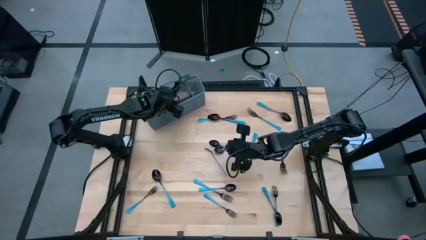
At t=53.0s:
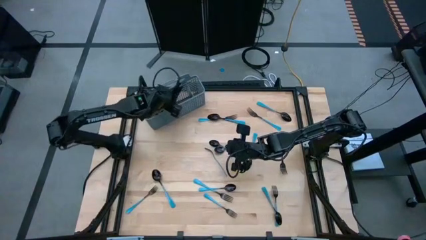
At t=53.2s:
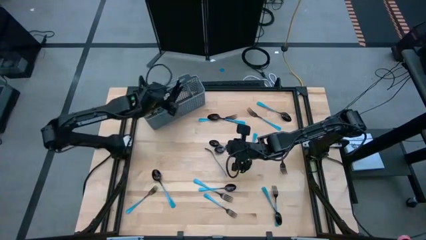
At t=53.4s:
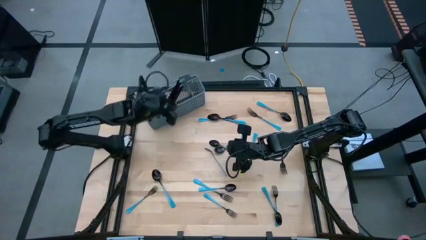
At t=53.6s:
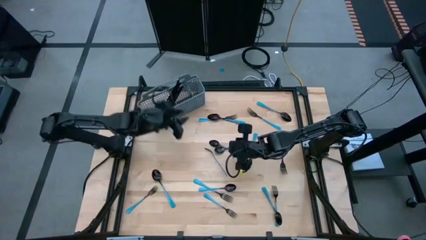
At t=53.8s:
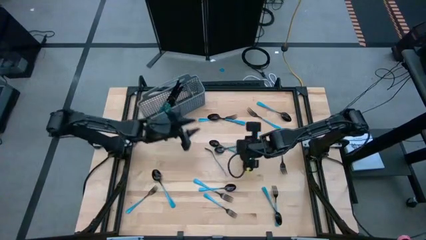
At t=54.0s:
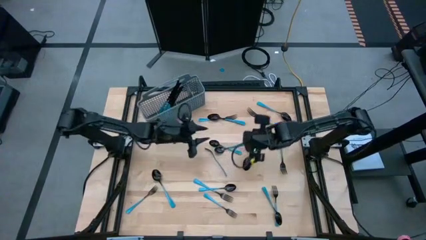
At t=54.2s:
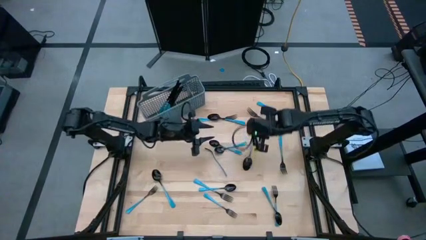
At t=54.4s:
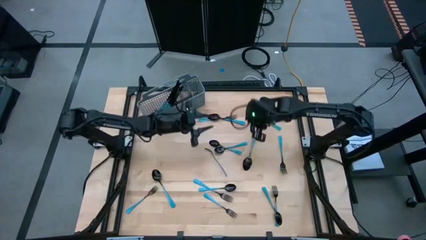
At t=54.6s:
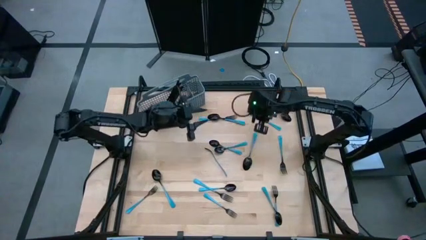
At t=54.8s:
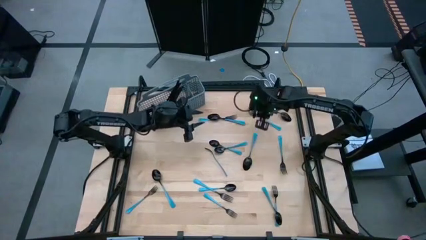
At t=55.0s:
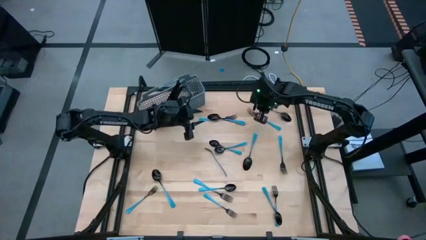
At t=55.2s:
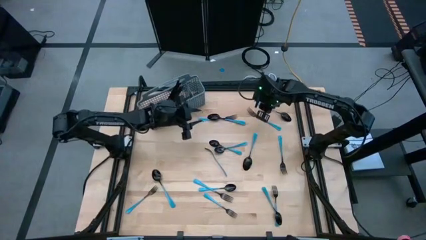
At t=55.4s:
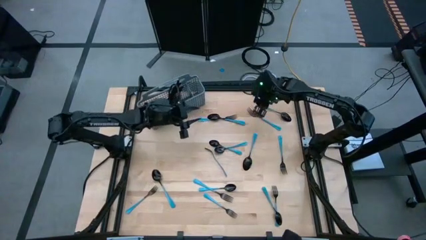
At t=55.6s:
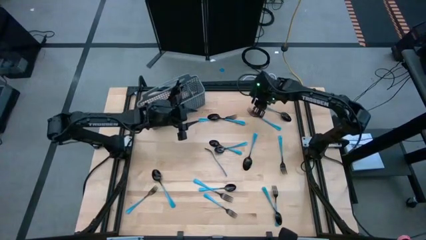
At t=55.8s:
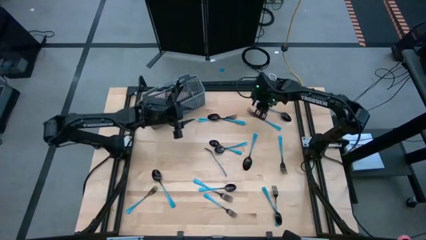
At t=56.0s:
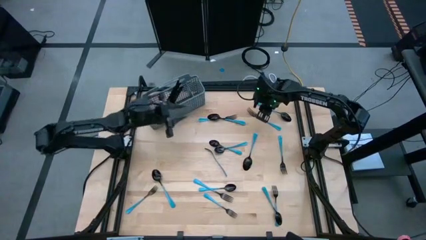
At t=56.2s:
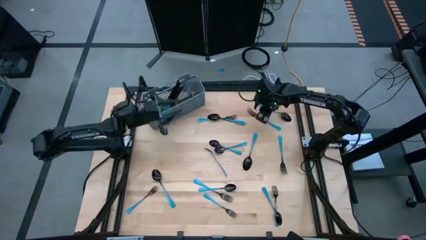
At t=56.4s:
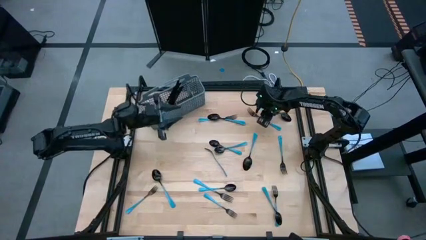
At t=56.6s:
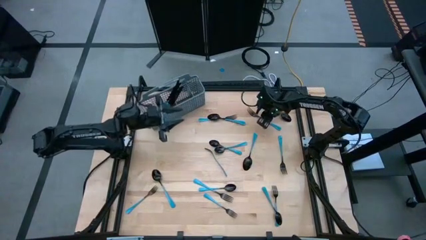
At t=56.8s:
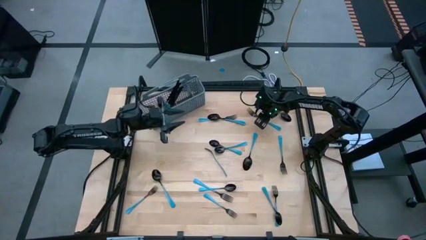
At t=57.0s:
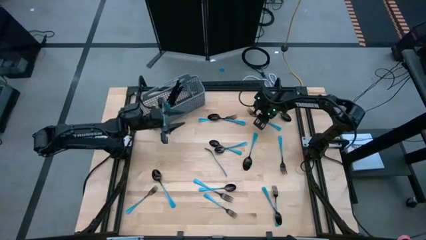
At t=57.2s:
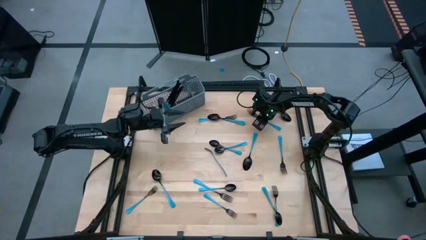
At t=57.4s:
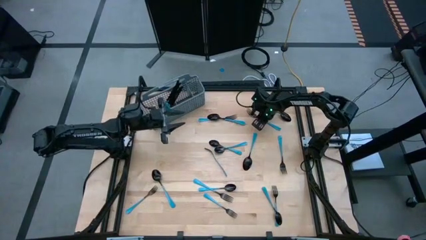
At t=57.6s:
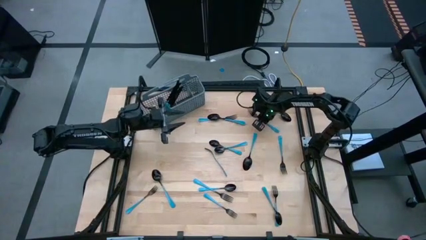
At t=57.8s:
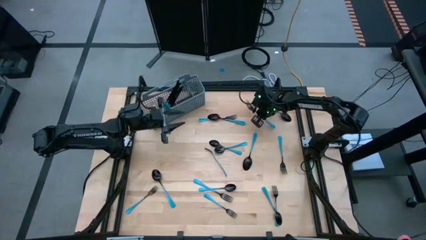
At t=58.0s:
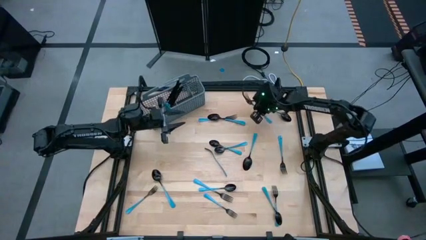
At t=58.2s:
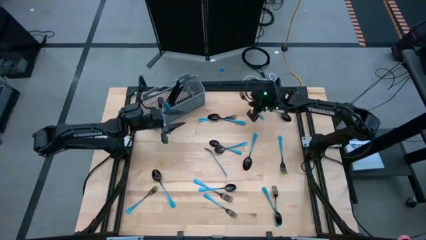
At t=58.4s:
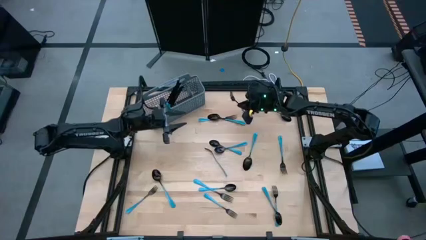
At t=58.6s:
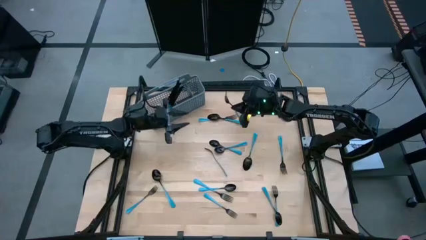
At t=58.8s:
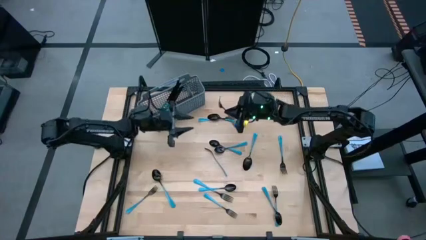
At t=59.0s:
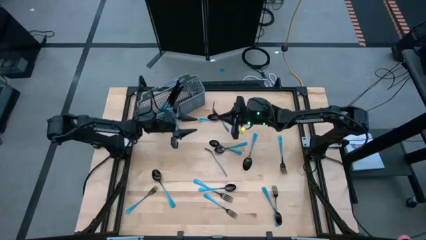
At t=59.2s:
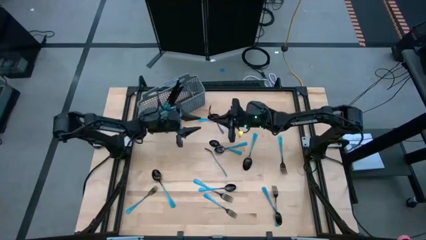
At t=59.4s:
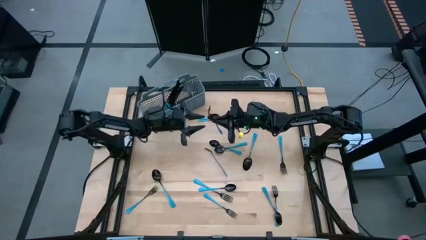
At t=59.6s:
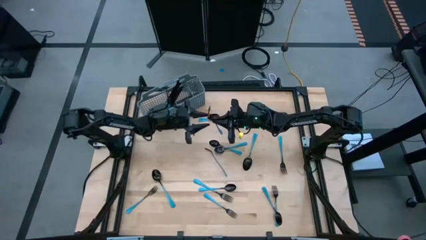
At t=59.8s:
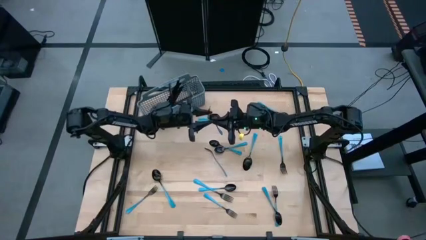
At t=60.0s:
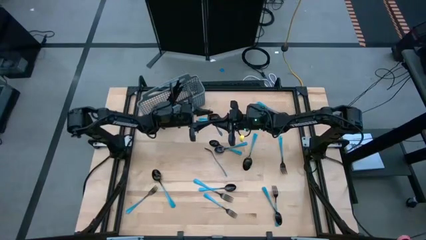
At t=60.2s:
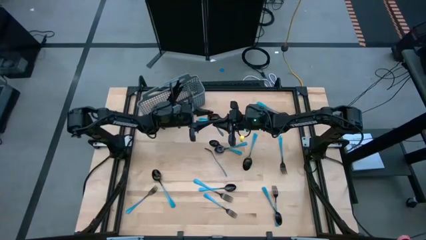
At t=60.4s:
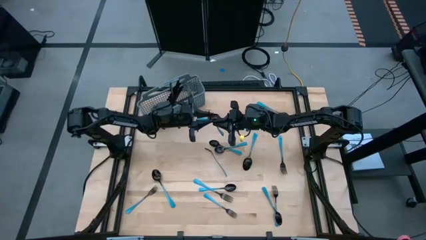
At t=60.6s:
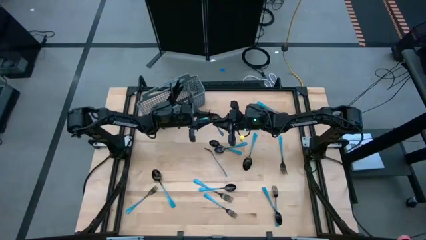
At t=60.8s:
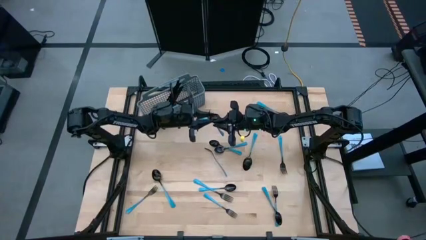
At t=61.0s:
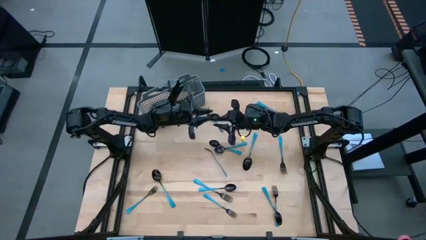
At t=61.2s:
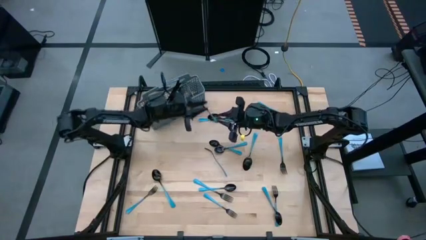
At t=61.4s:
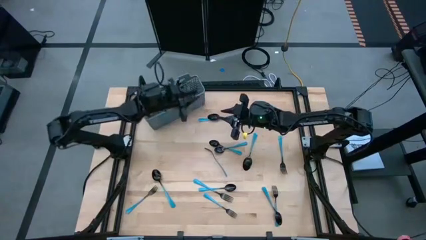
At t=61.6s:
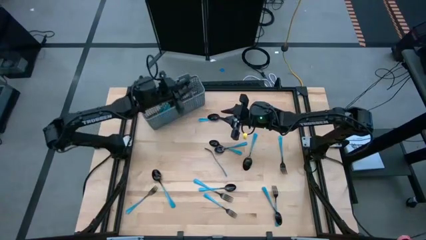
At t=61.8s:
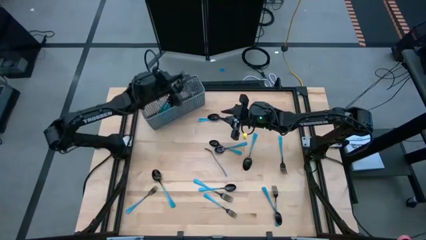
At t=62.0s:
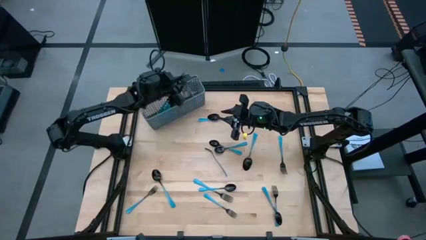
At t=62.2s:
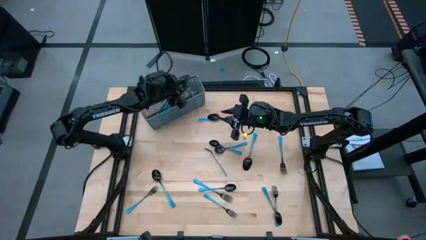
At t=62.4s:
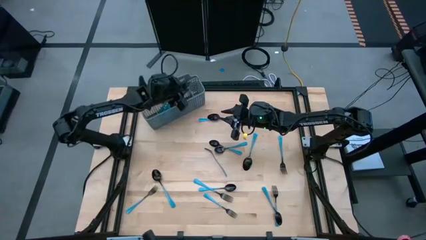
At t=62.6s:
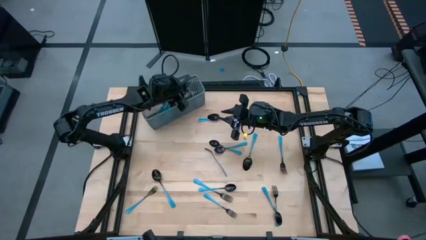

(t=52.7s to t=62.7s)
Task: Sort silverware
Put the blue fork in the silverware rack

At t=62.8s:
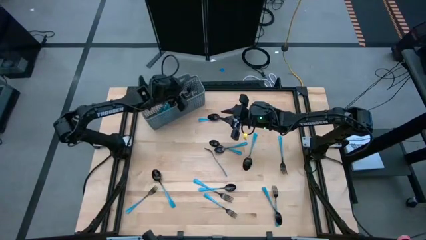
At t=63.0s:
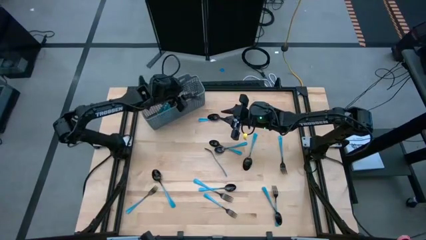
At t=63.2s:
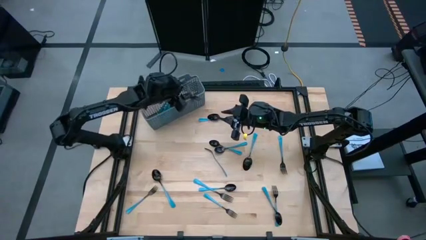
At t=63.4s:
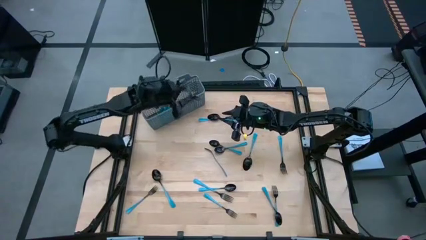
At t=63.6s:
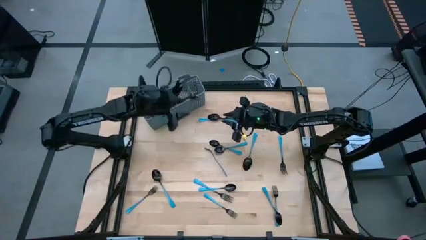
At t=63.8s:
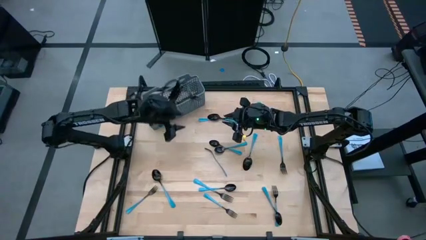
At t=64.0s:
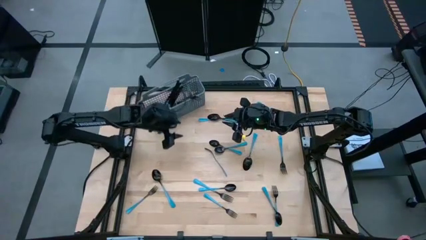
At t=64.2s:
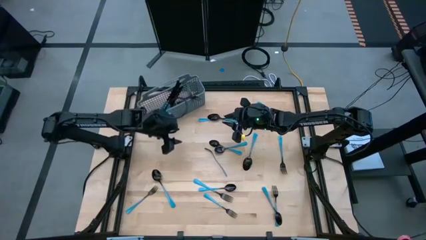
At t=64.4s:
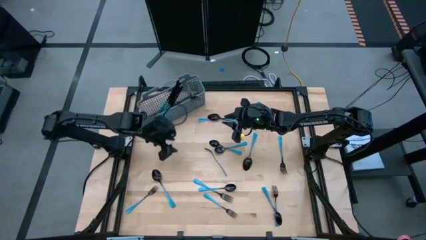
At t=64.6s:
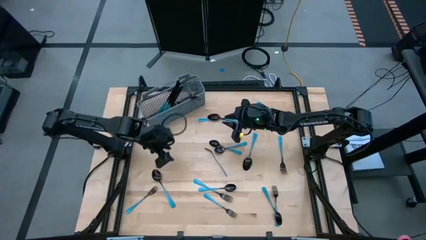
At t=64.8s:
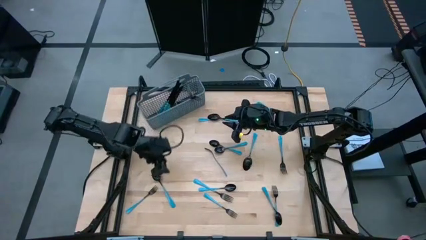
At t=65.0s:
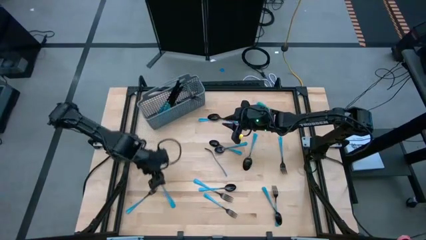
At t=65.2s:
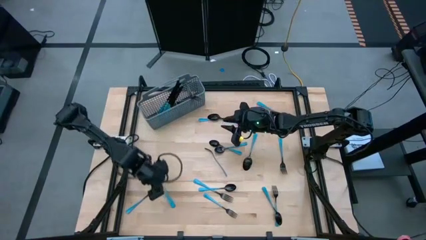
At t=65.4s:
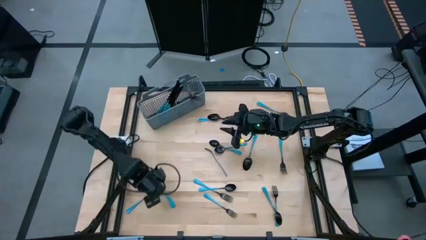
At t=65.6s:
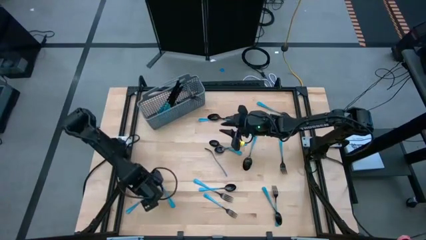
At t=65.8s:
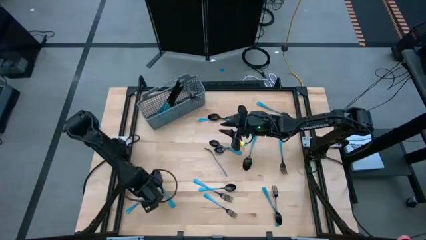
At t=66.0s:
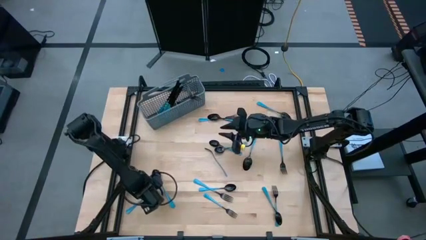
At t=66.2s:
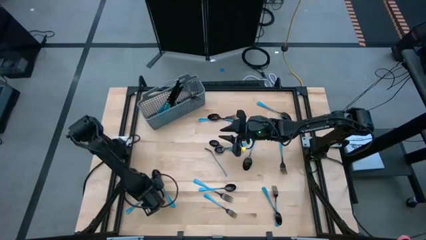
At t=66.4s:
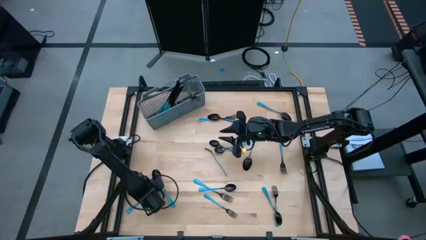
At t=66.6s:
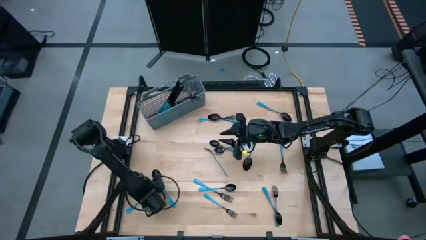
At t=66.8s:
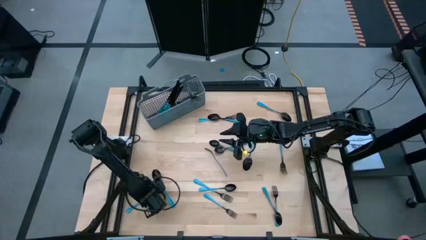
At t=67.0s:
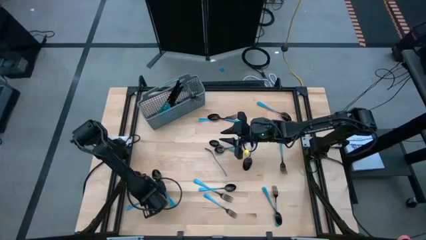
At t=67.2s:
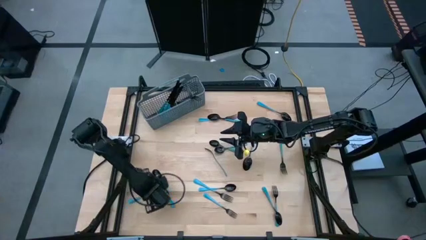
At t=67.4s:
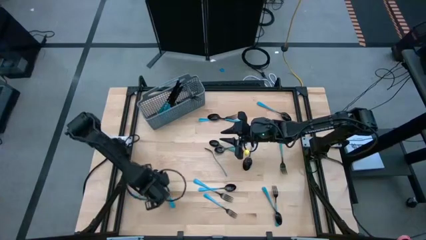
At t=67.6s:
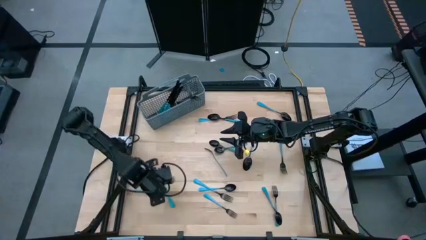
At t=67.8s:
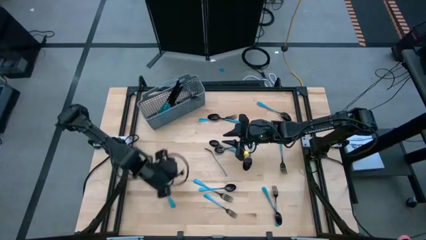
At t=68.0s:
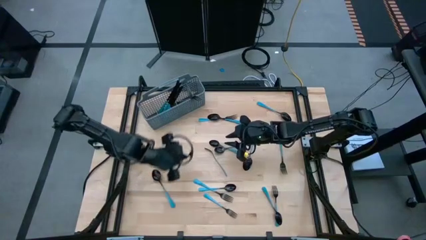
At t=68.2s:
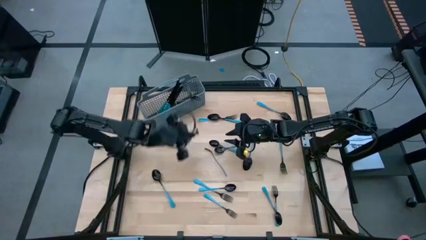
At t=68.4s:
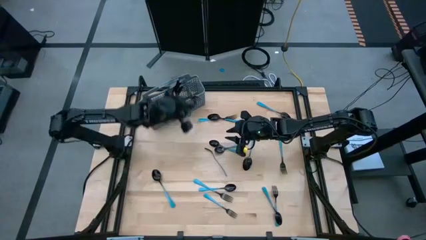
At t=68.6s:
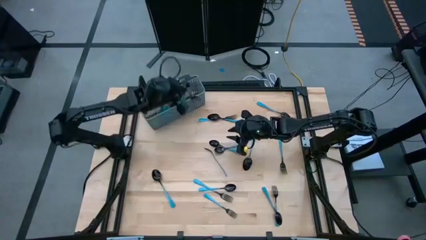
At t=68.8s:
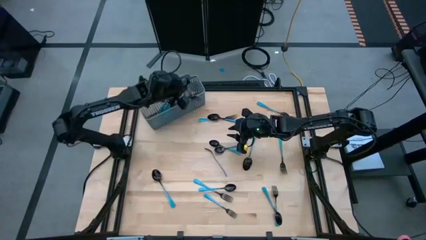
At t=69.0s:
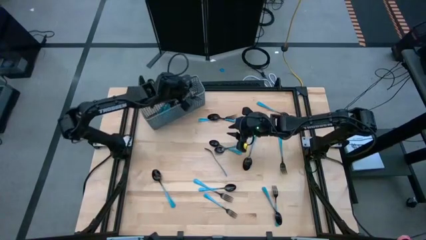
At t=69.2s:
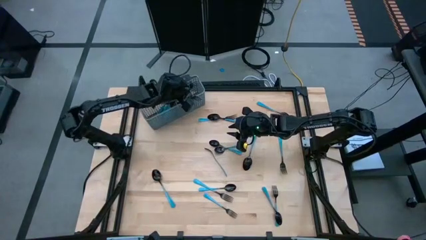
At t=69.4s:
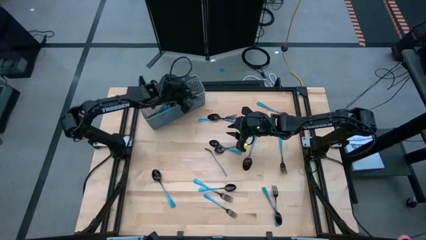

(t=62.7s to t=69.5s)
Put the blue fork in the silverware rack
